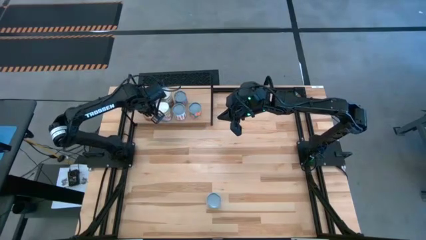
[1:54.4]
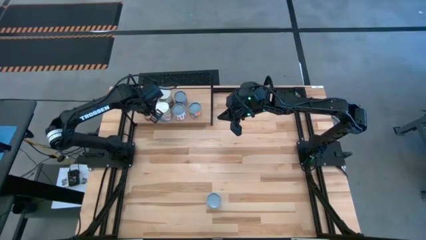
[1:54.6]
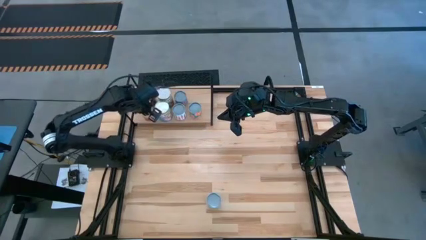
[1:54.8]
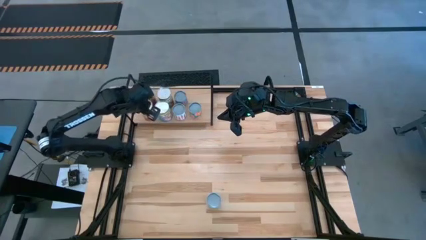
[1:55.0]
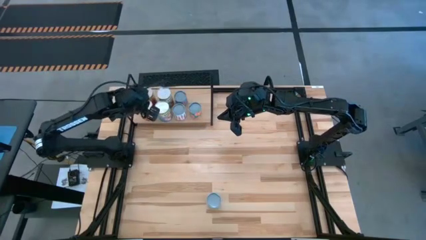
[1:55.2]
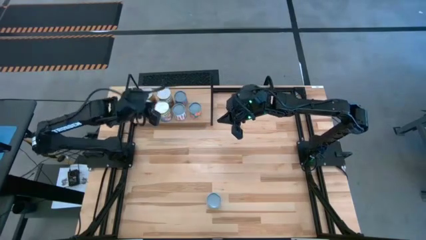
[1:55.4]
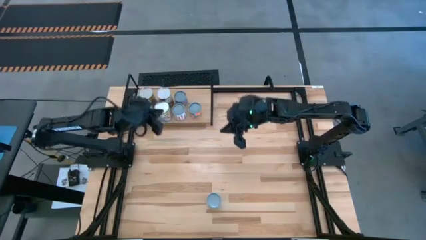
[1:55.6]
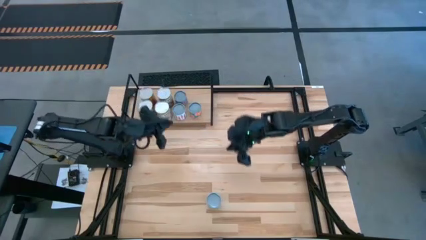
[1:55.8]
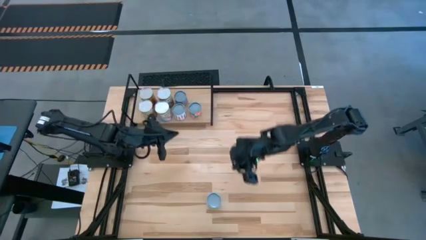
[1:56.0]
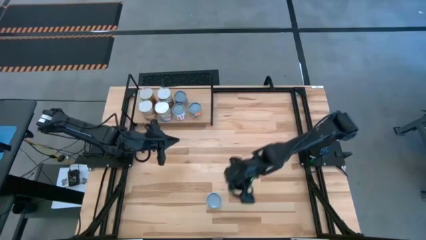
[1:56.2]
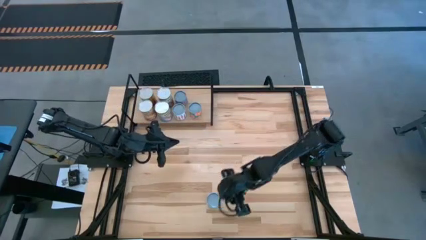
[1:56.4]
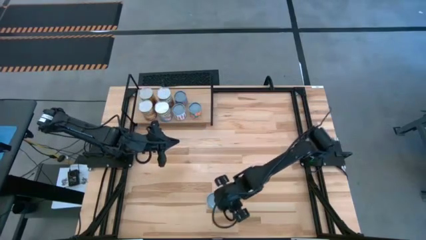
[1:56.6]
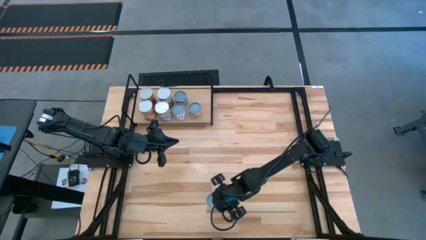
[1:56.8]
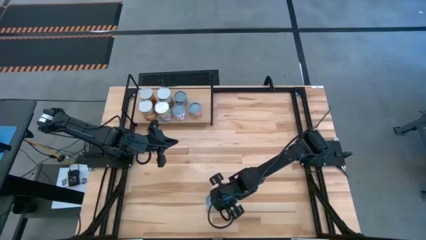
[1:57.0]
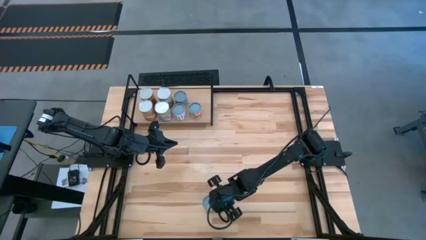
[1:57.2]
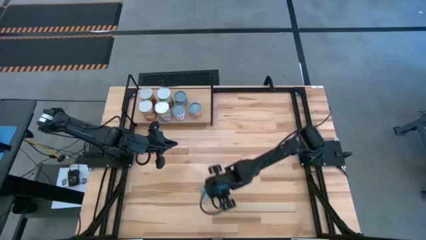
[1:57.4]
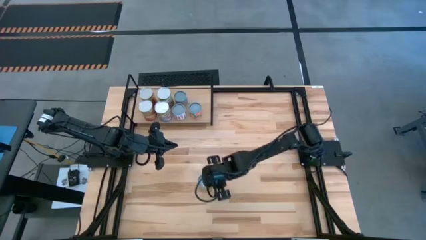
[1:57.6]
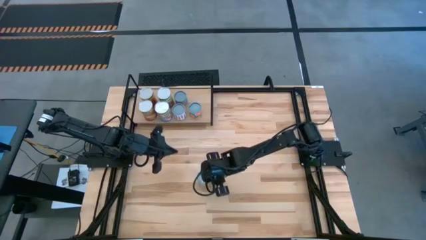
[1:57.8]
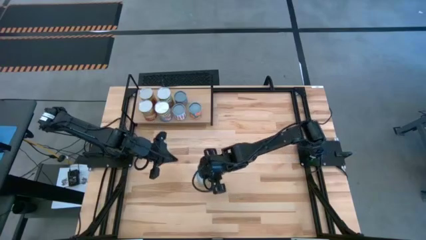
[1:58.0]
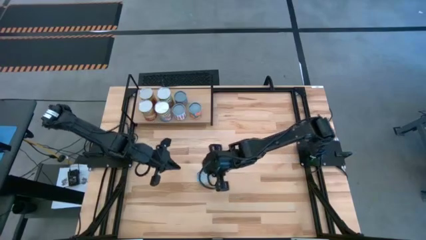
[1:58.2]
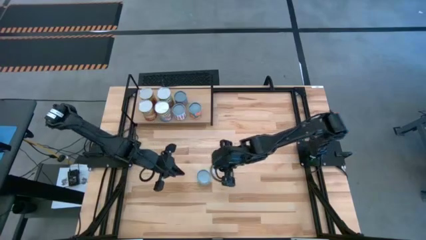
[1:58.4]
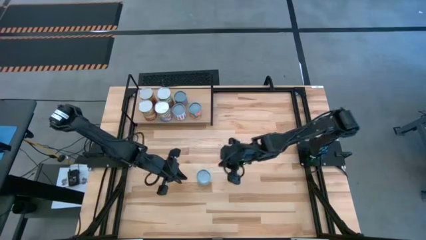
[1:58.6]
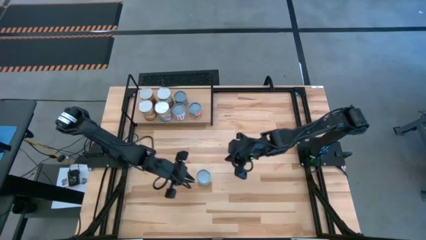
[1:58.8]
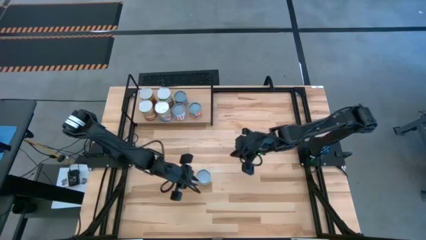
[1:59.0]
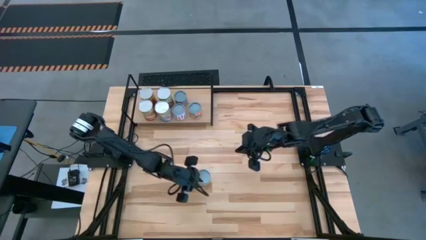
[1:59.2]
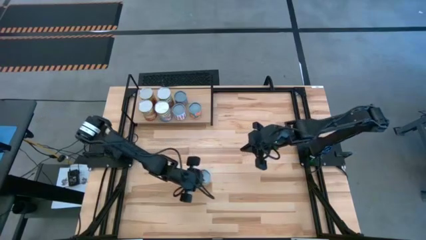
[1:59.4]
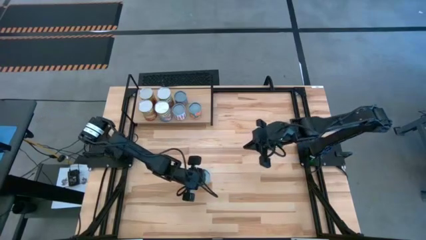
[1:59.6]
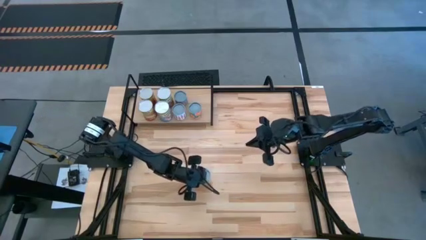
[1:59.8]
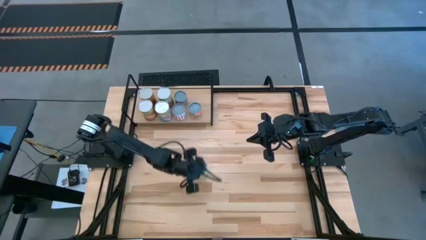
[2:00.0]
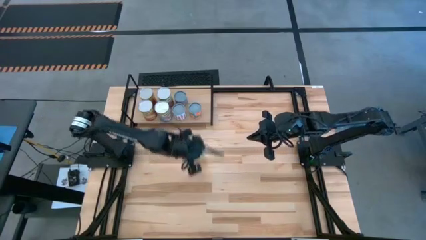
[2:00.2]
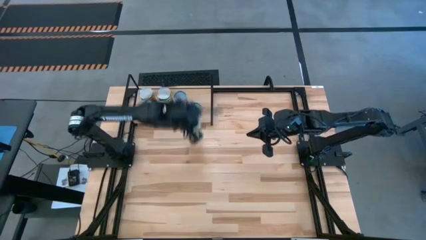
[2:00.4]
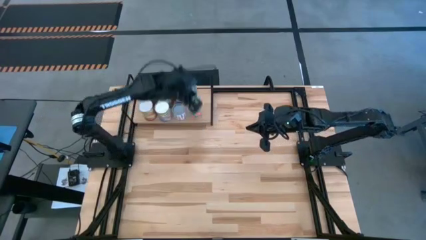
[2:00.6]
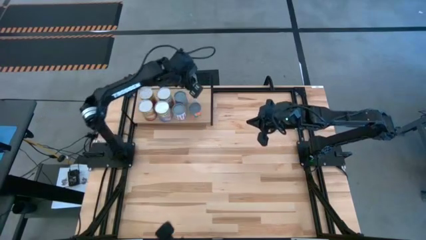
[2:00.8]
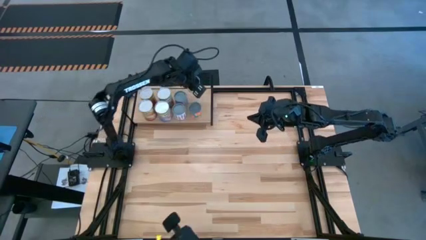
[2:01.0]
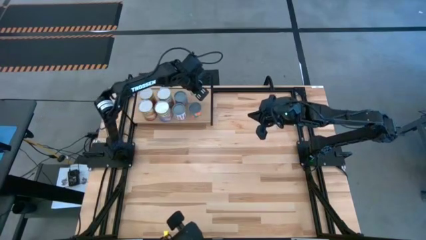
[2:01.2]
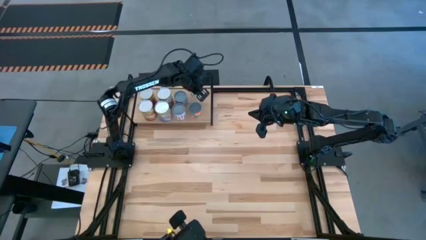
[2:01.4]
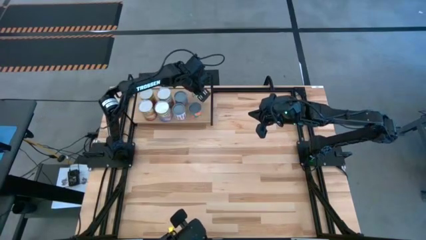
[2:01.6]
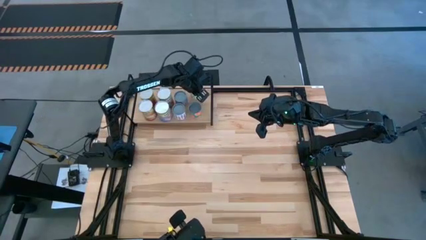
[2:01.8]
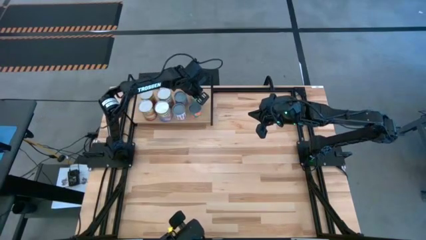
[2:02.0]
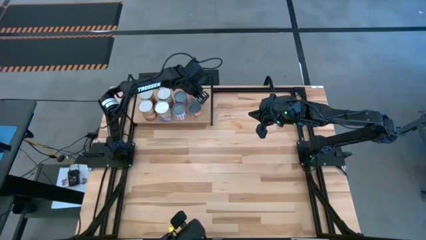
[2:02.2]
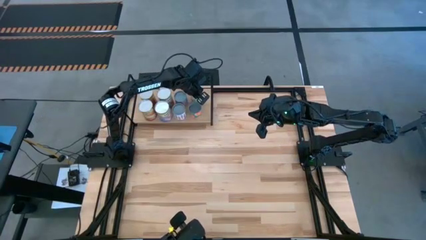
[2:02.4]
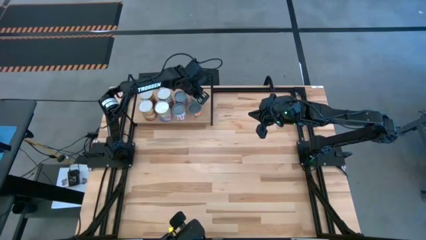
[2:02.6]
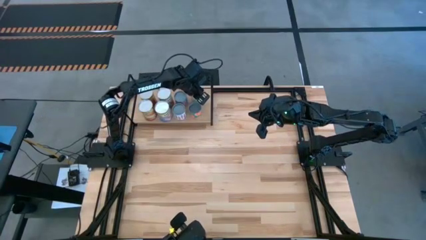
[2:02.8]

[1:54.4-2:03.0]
Task: Pick and place cans onto a shelf
Put the small canned green peas on the shelf

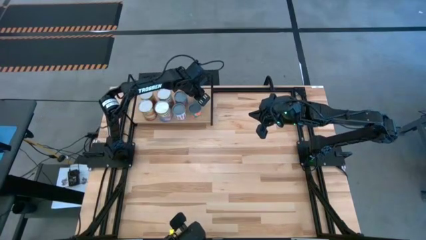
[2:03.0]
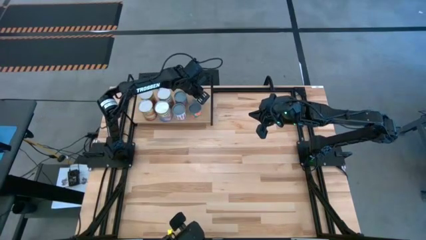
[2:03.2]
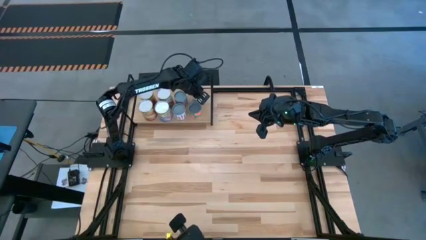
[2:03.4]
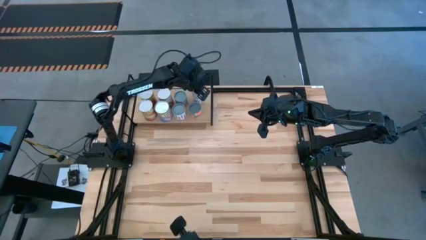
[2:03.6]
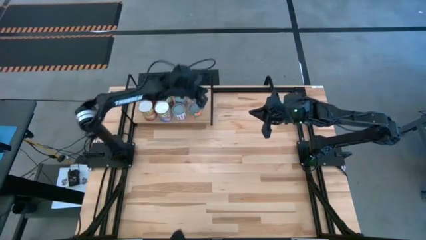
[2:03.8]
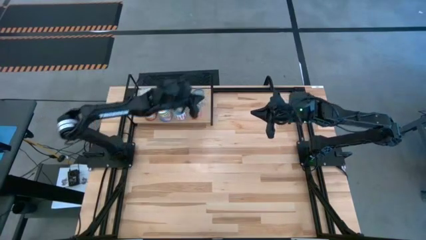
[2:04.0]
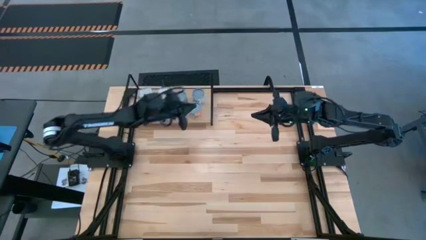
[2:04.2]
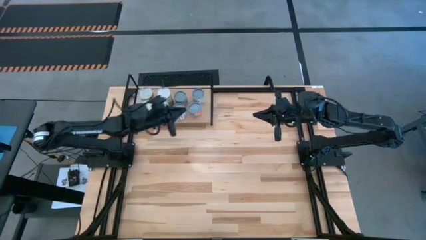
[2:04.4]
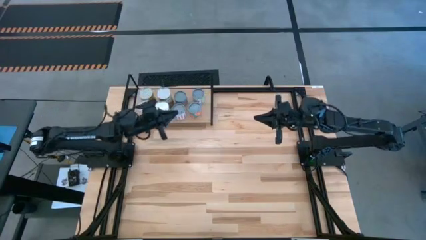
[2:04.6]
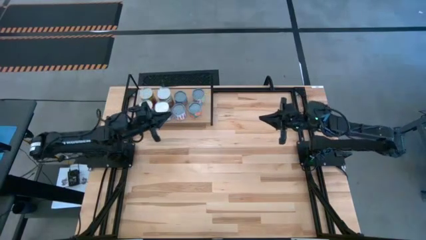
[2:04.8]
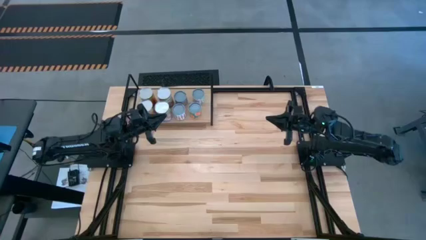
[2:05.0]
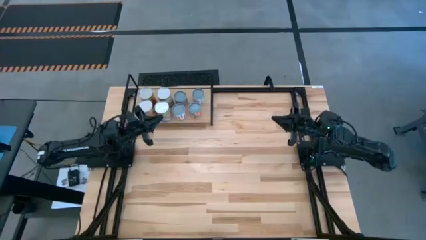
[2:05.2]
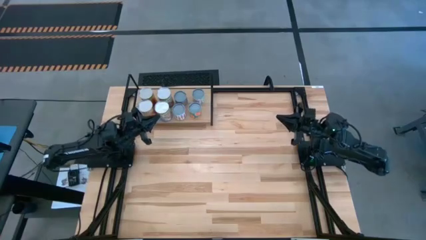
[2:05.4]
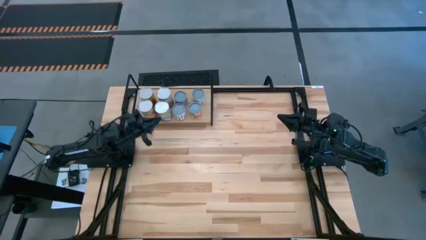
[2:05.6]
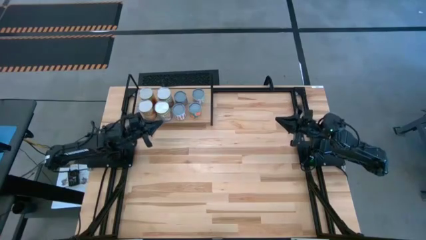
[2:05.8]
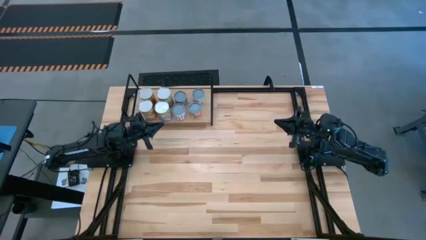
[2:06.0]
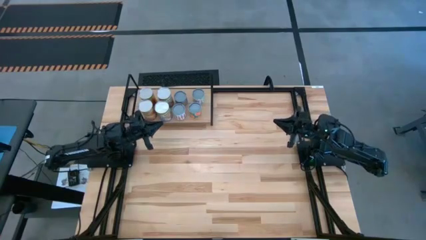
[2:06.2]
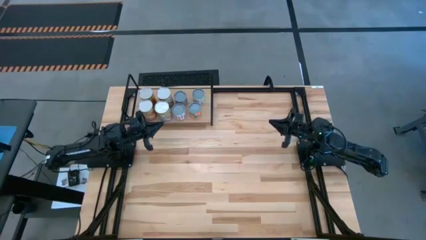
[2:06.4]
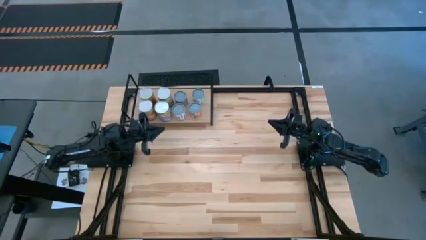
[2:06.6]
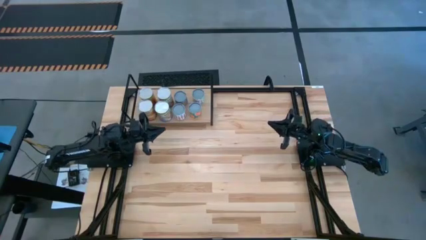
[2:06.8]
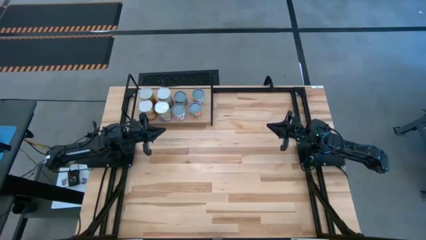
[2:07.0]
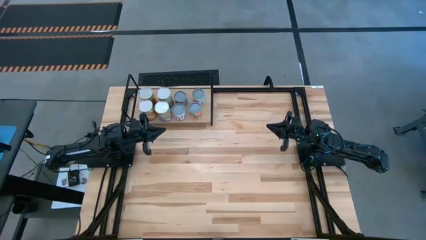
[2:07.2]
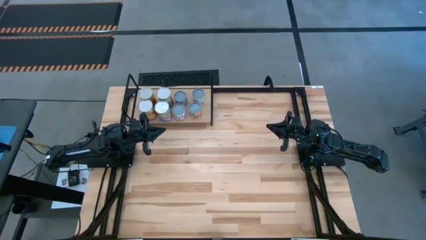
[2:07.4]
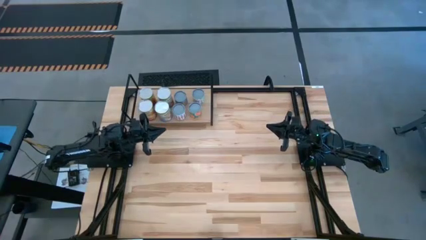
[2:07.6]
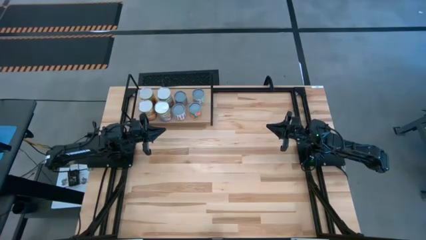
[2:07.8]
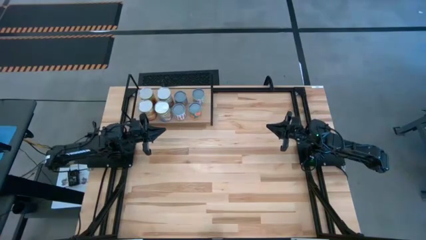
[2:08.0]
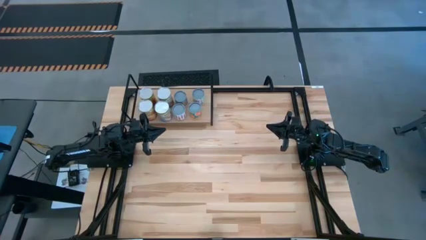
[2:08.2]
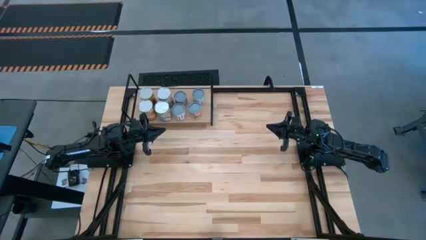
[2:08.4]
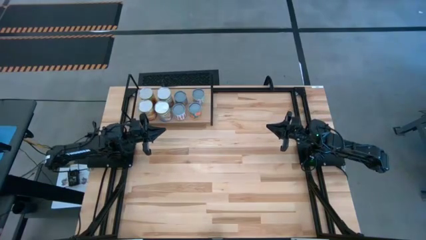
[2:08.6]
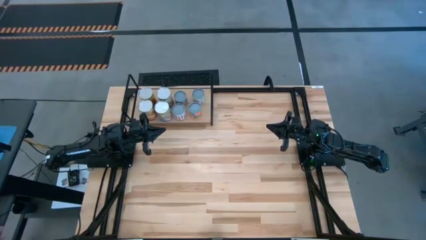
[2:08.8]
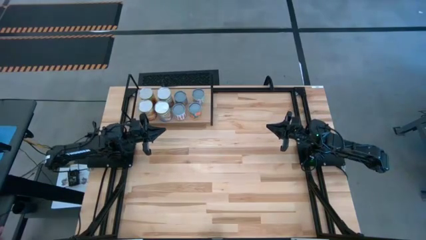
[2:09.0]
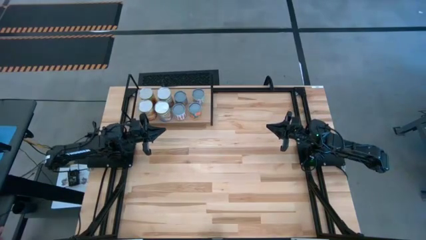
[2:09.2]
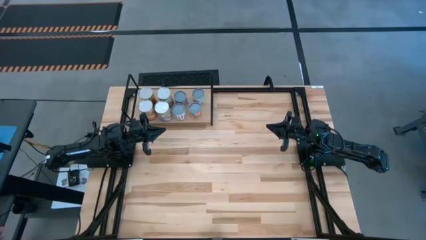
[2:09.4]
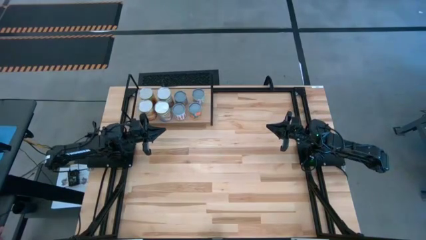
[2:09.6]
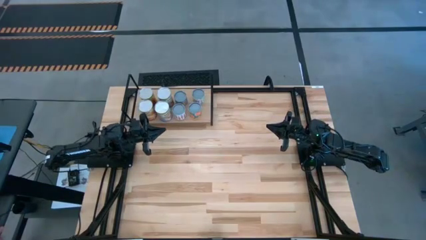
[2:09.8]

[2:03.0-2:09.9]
Return to Home Position

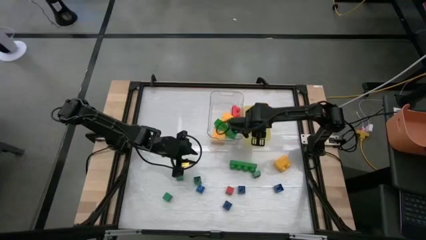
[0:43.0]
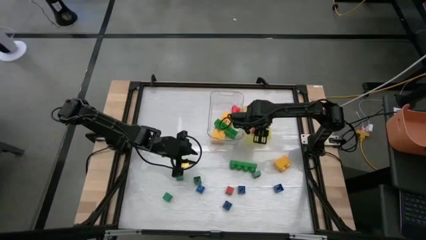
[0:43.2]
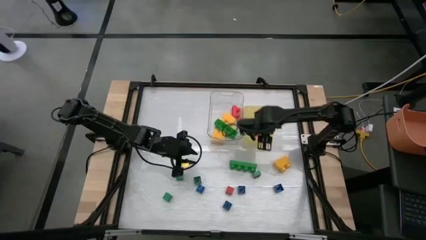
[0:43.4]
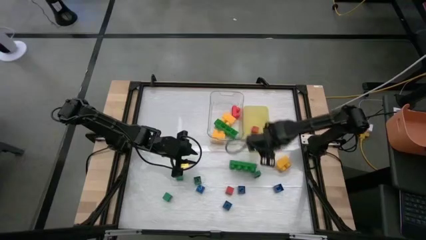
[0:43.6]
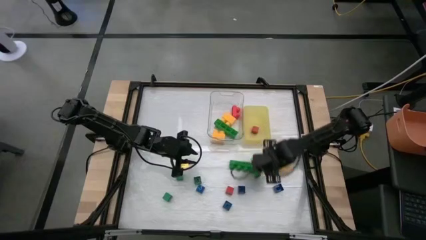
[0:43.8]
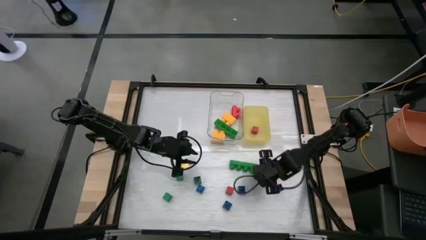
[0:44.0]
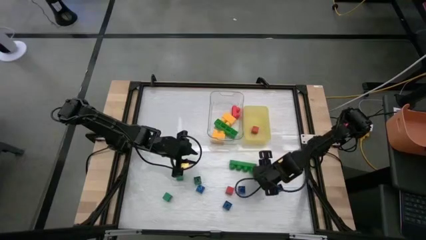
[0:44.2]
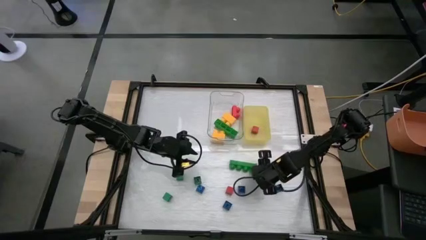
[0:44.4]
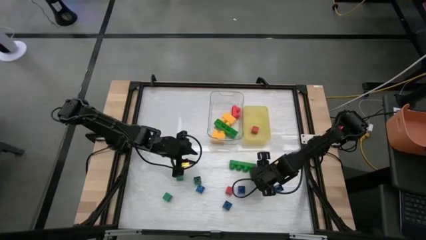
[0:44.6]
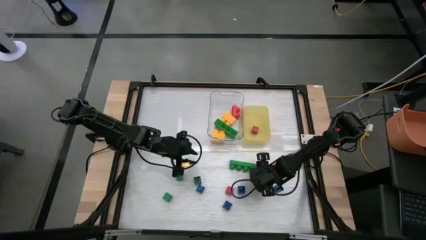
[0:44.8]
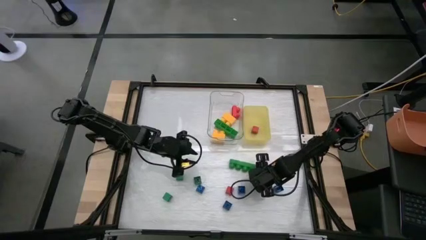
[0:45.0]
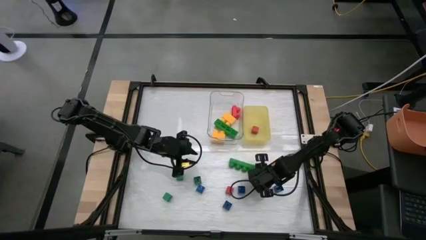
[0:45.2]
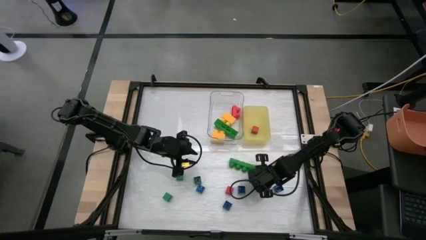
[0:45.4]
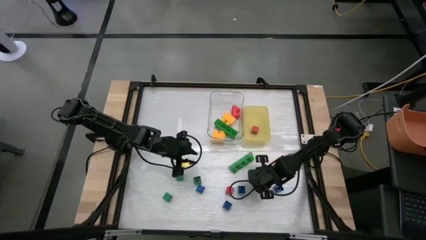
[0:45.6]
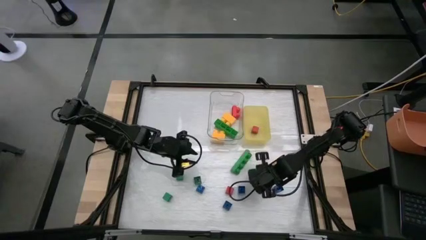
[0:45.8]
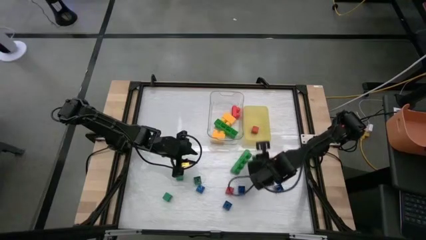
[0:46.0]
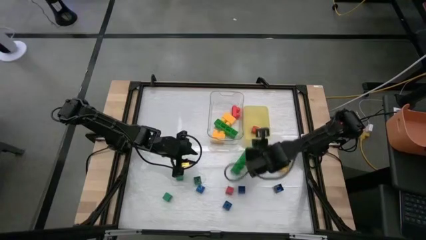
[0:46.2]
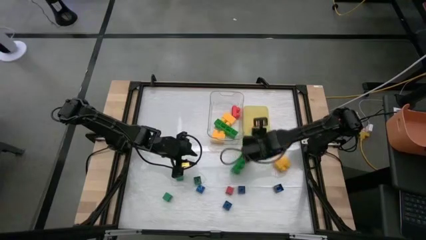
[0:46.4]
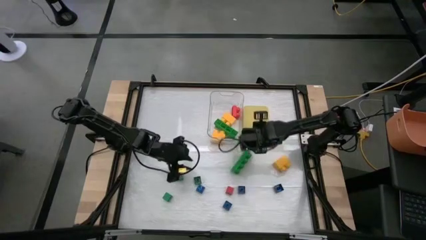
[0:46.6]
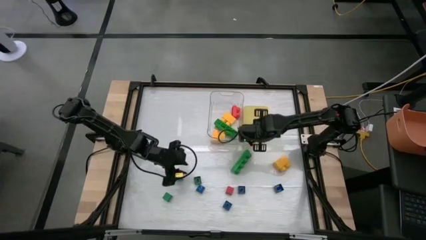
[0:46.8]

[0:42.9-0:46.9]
Task: Sort blocks by size
Put the small green game piece into the yellow bin
